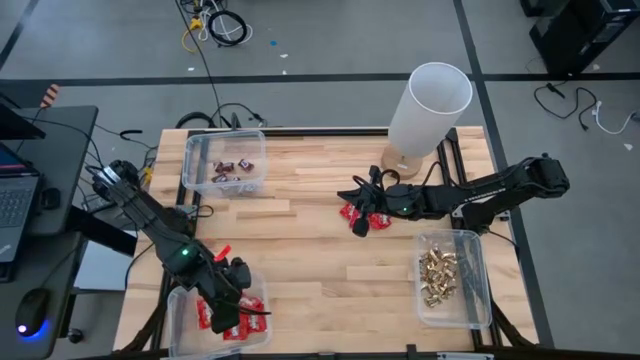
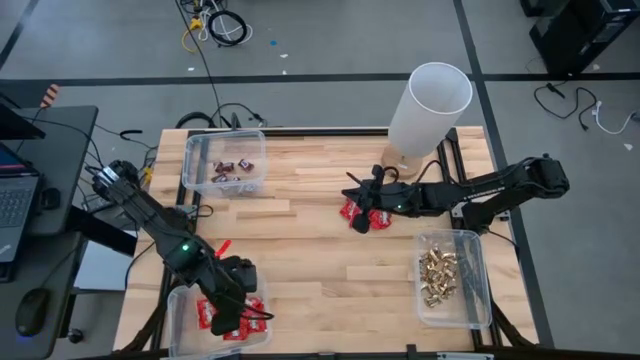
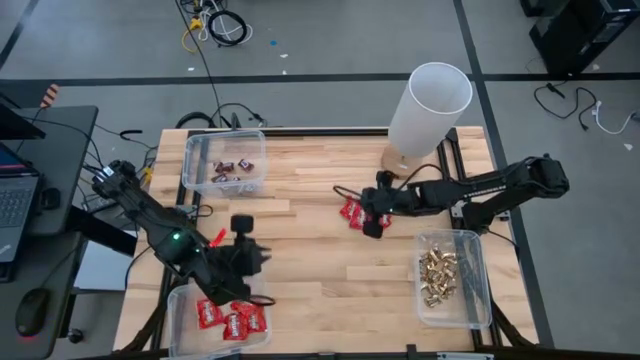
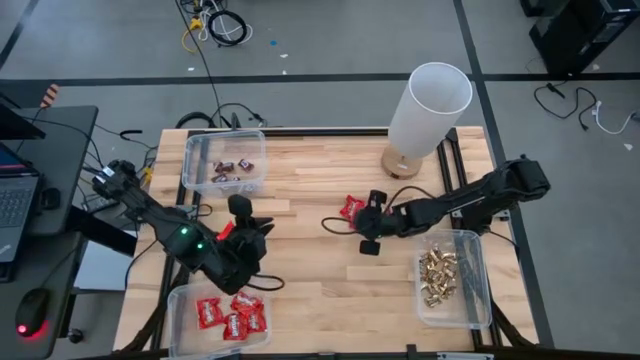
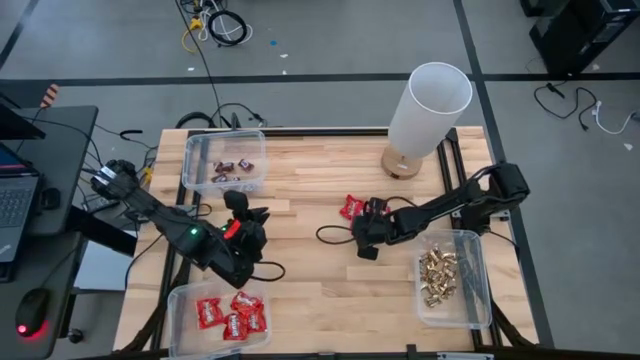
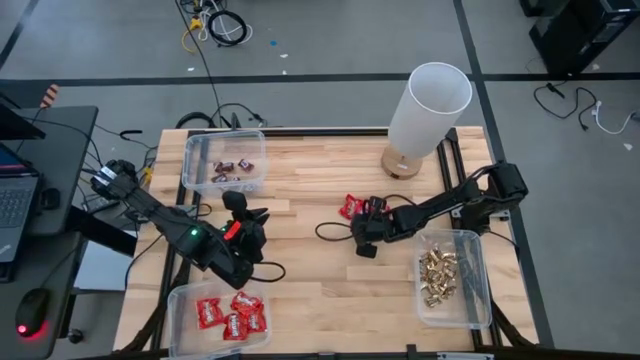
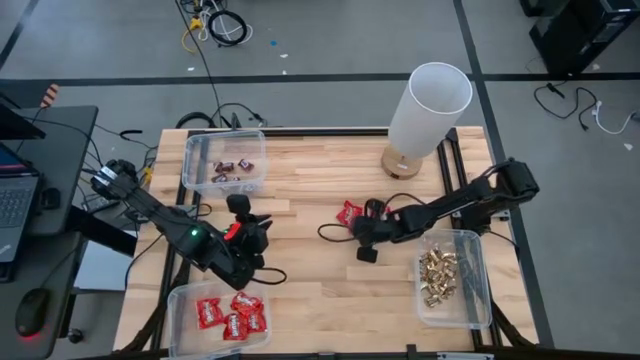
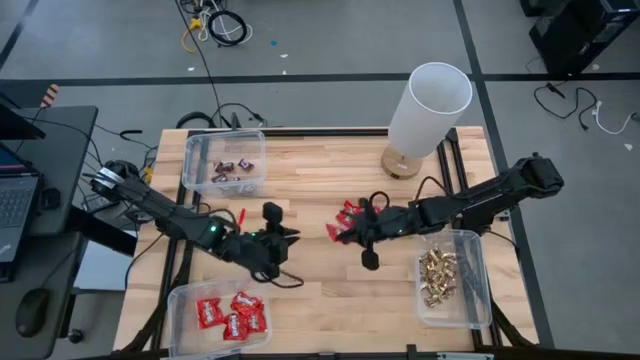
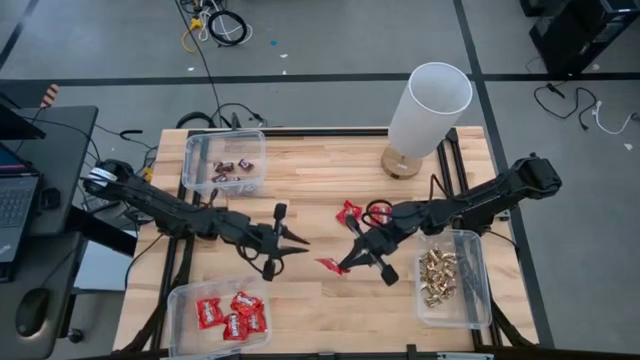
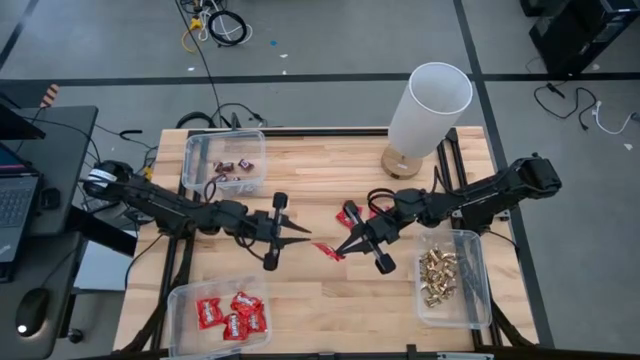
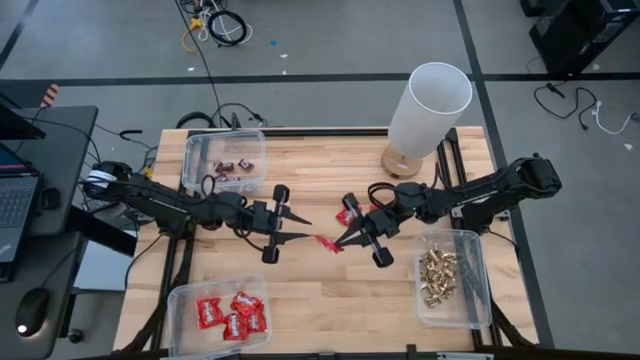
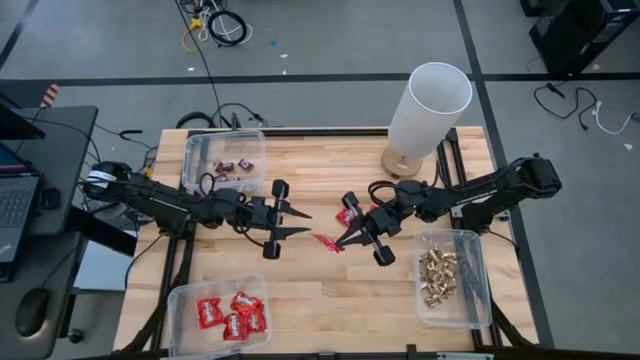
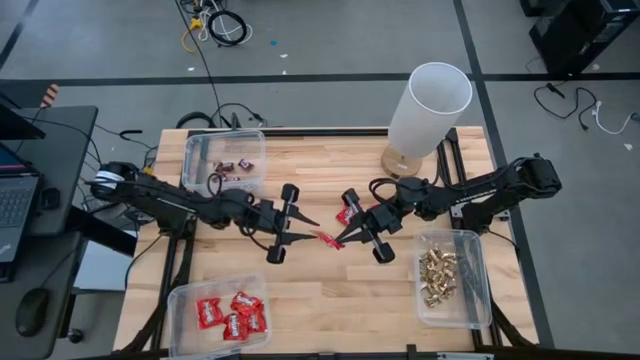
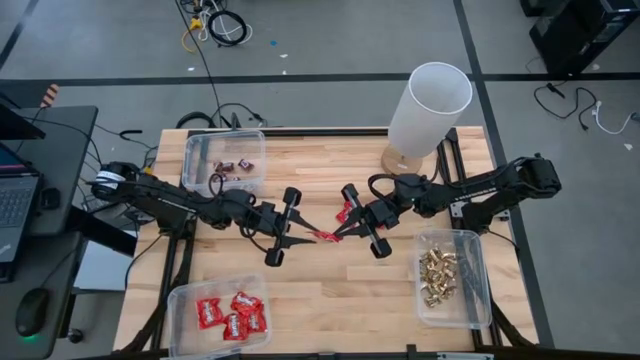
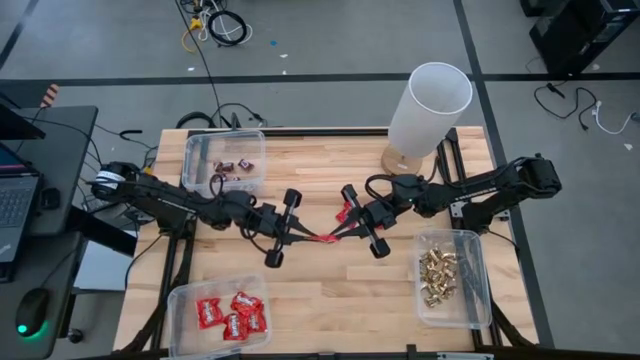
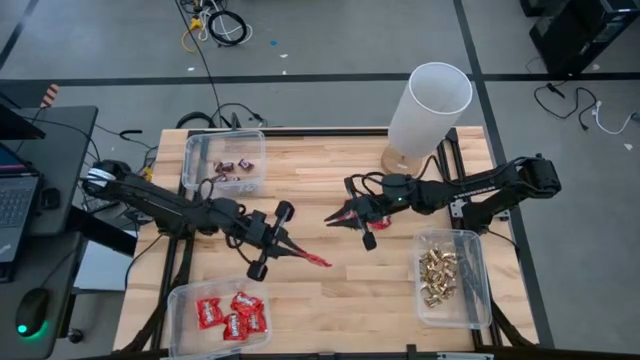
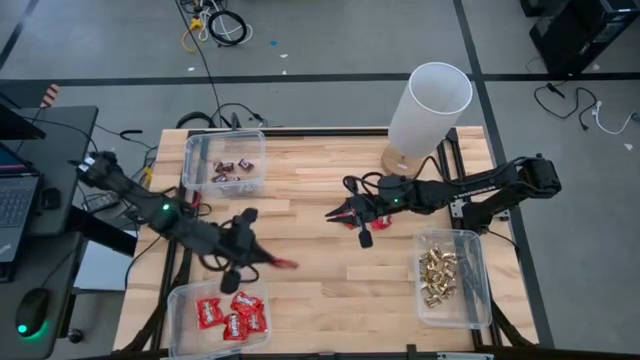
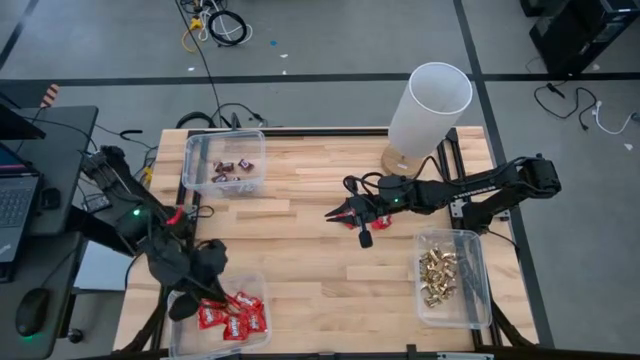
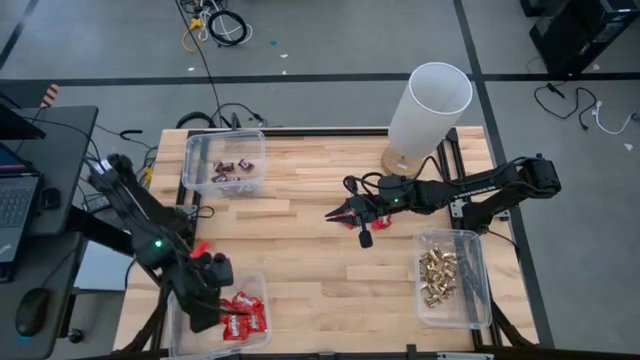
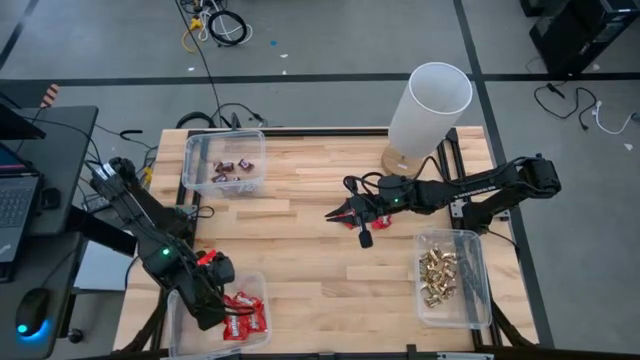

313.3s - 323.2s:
Task: Sort candy
Put the red chocolate into the bottom left transparent bin

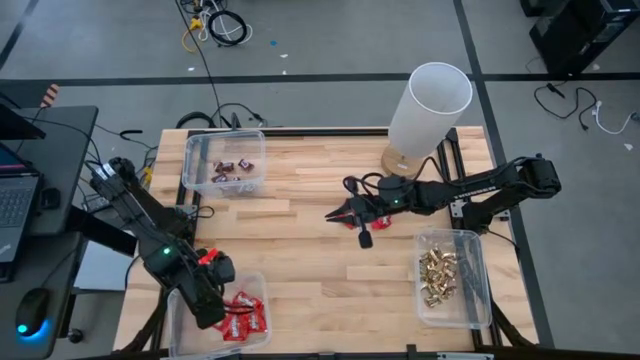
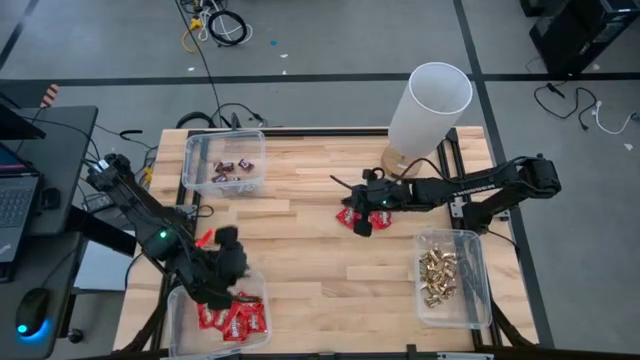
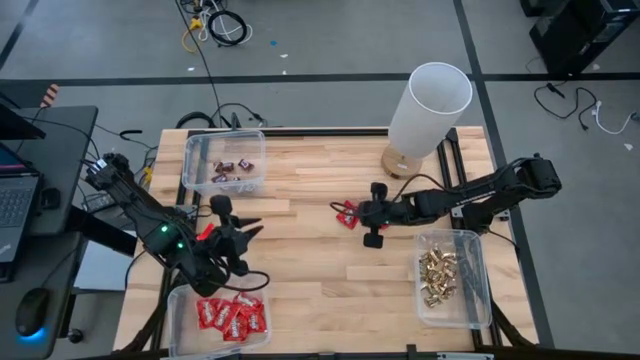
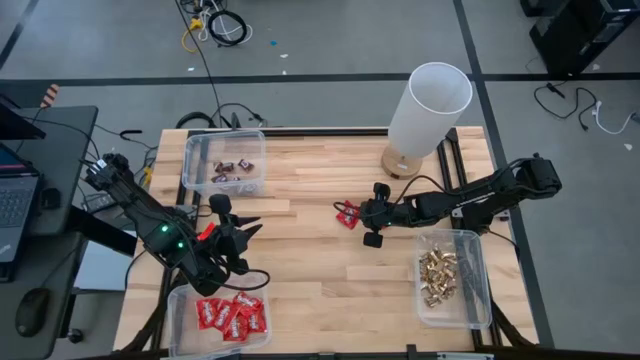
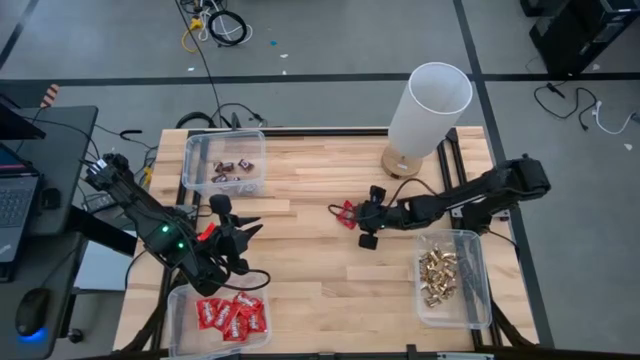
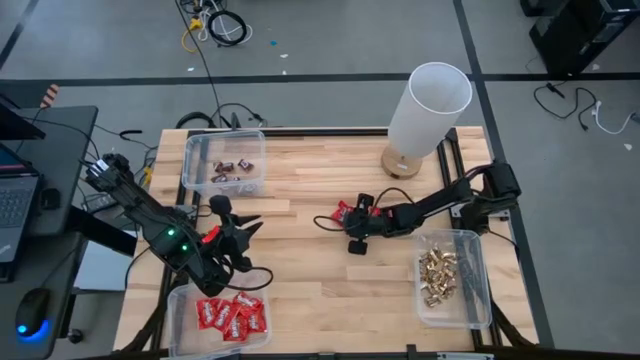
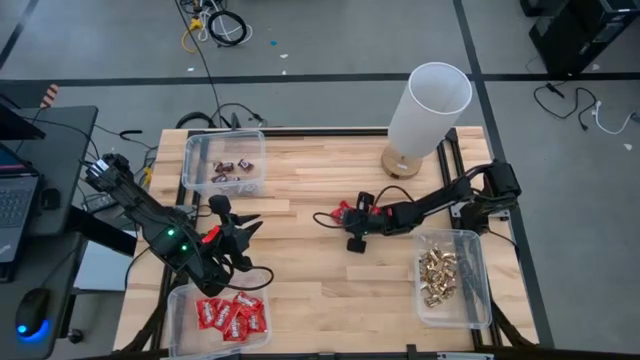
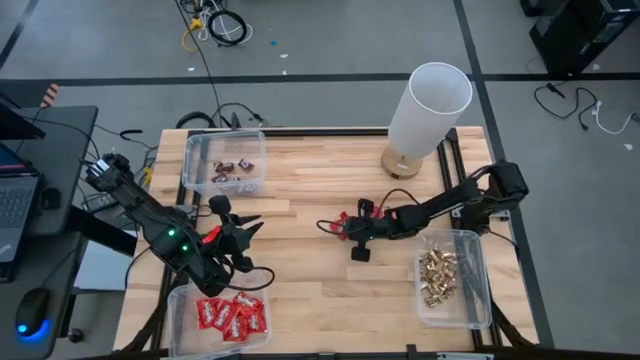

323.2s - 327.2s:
Put the red chocolate into the bottom left transparent bin

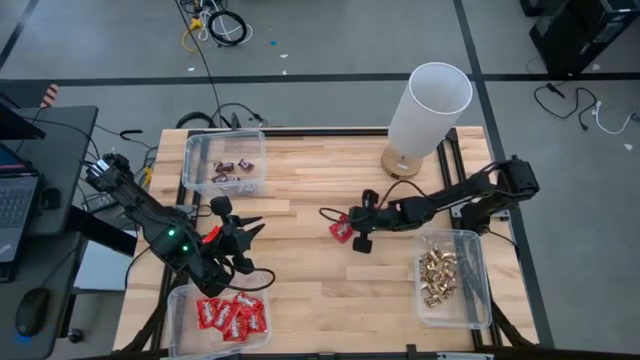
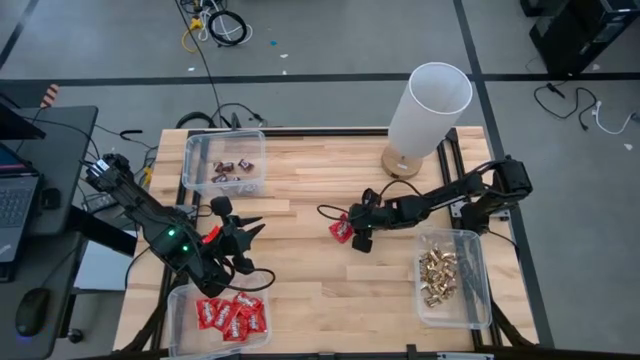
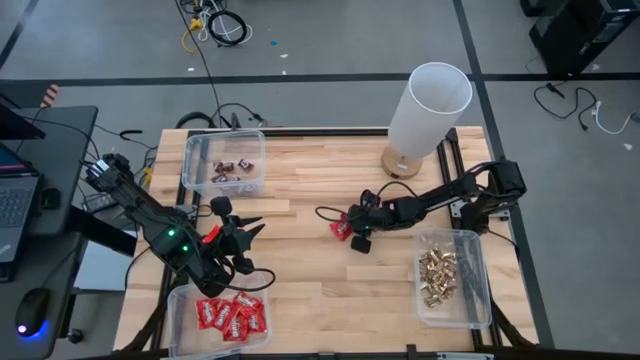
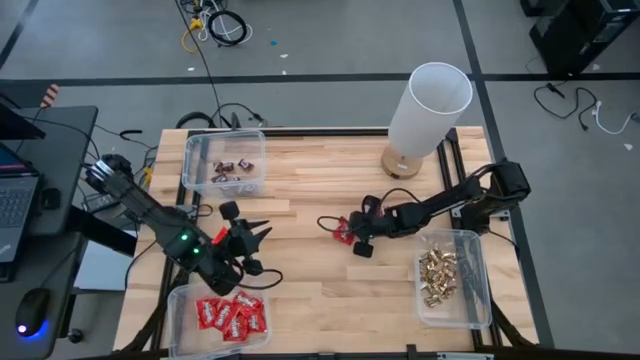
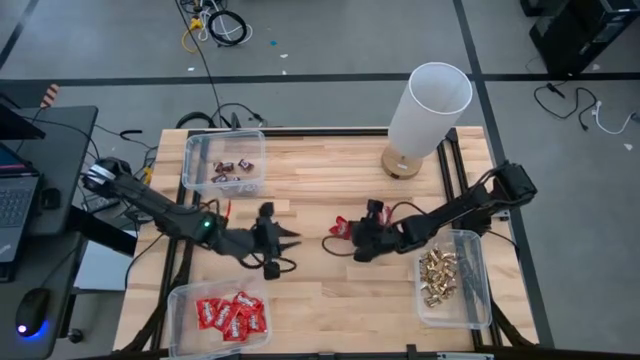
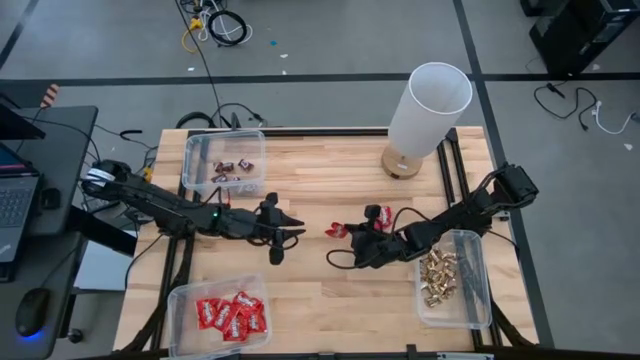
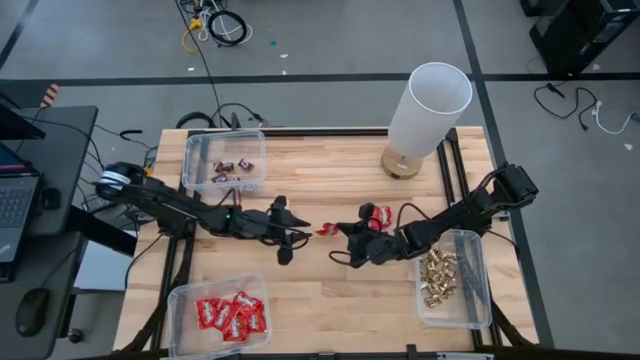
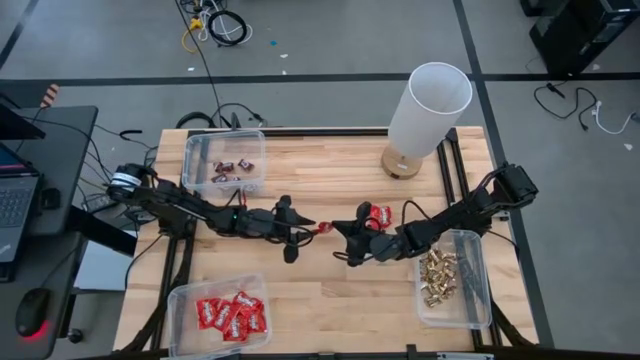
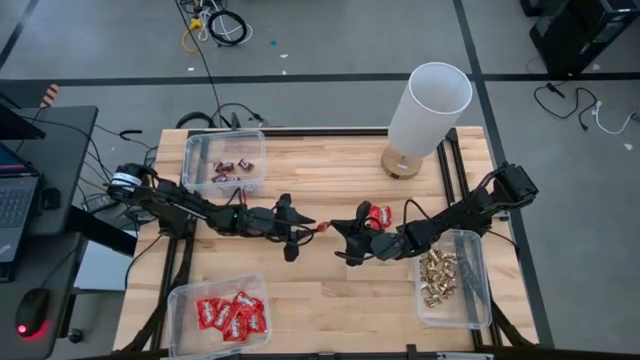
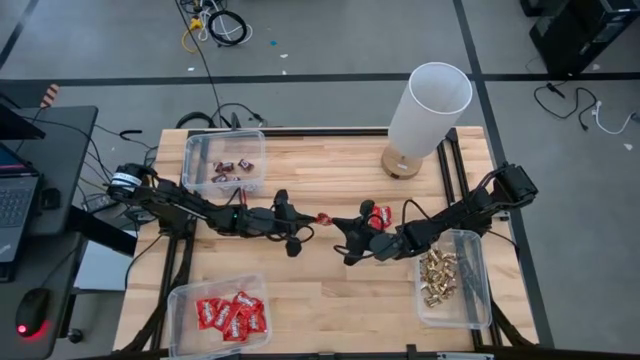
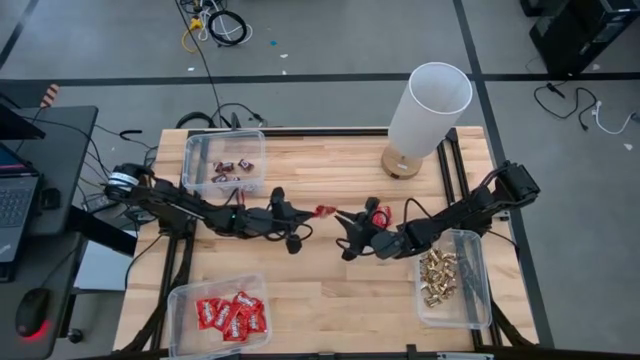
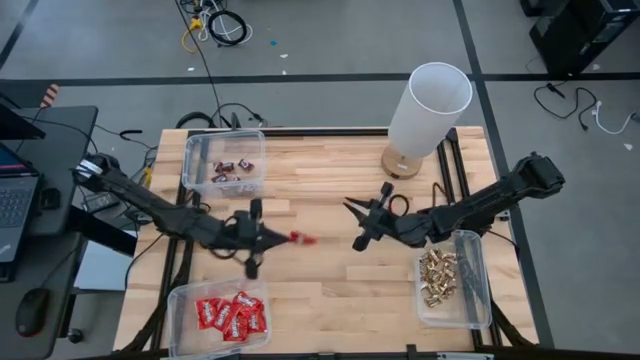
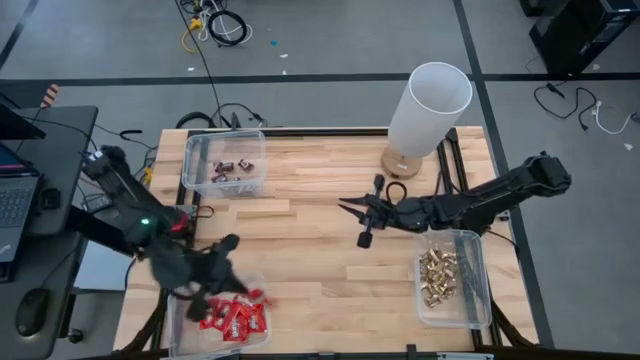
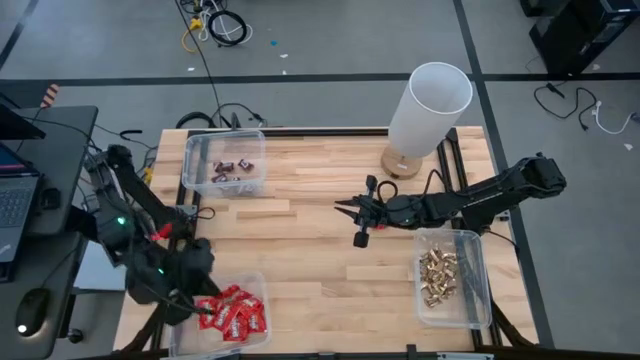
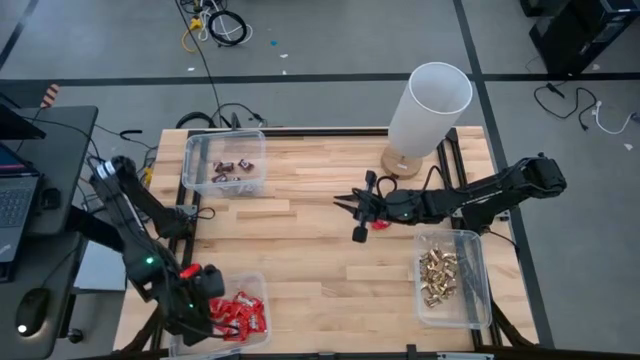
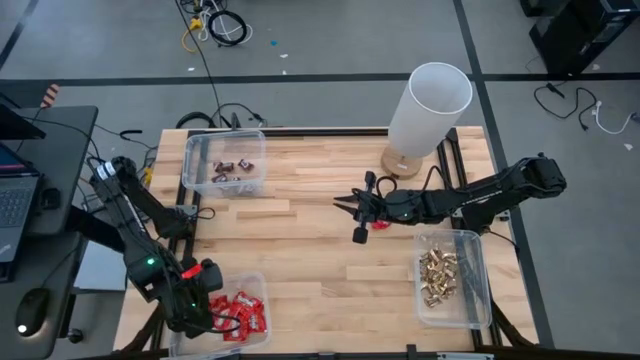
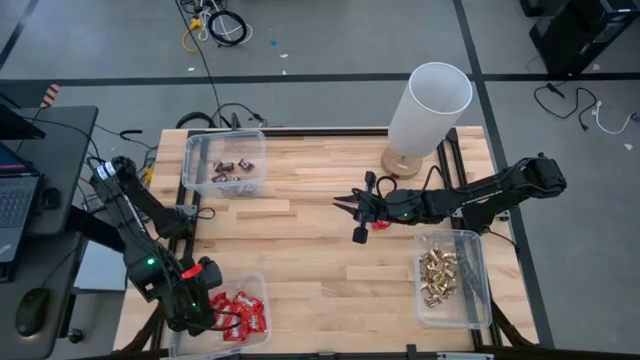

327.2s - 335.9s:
Put the red chocolate into the bottom left transparent bin
